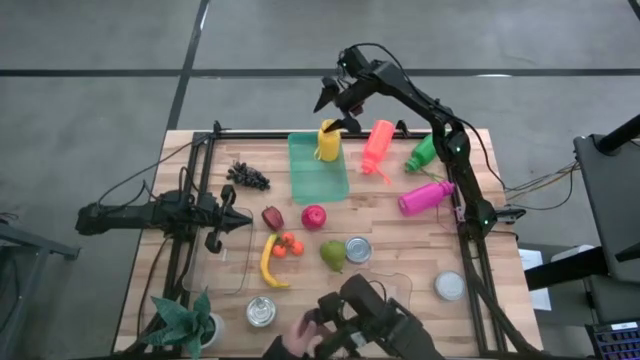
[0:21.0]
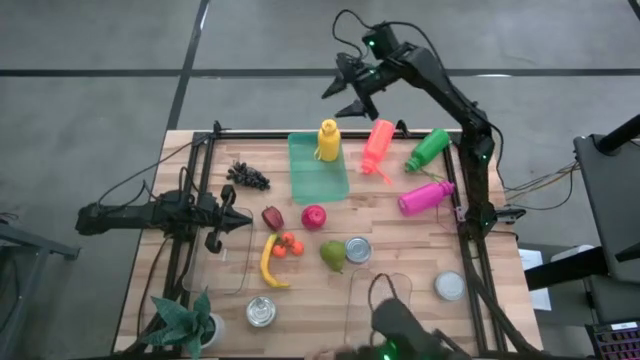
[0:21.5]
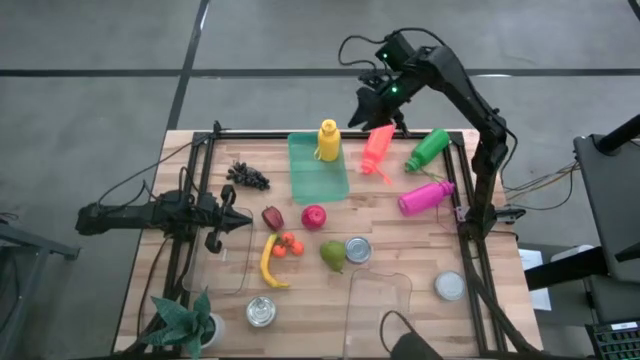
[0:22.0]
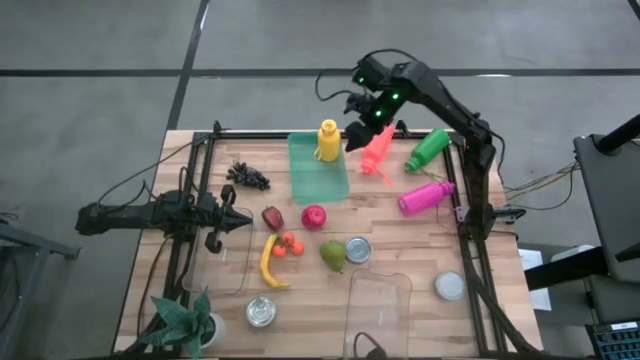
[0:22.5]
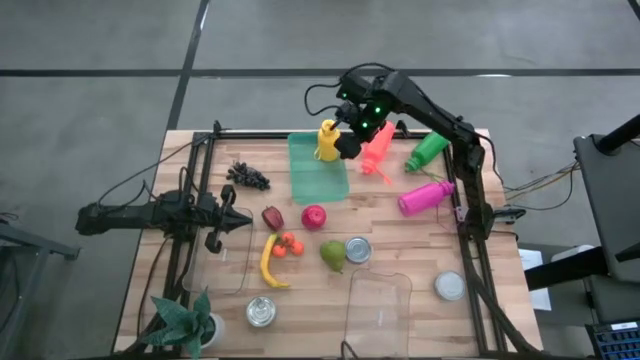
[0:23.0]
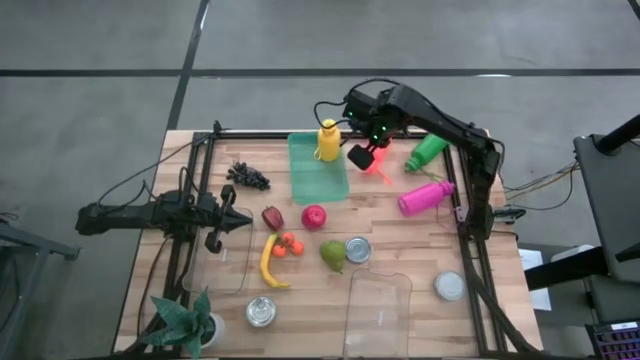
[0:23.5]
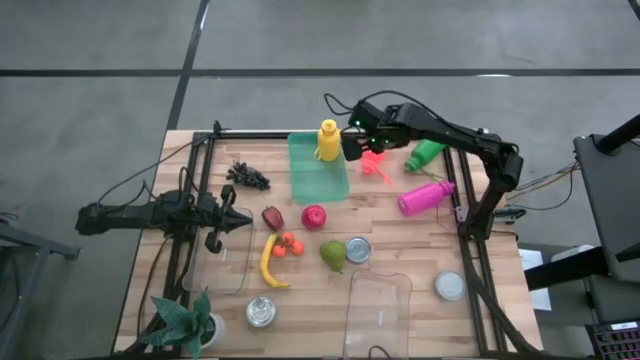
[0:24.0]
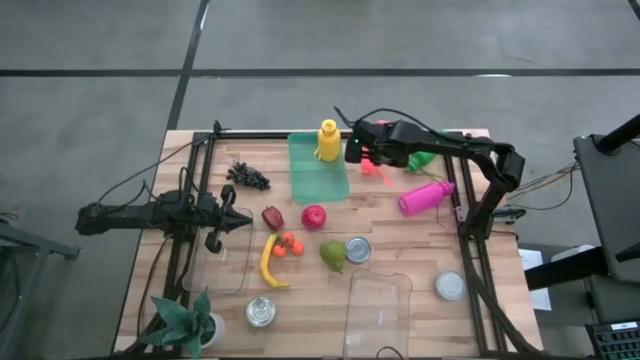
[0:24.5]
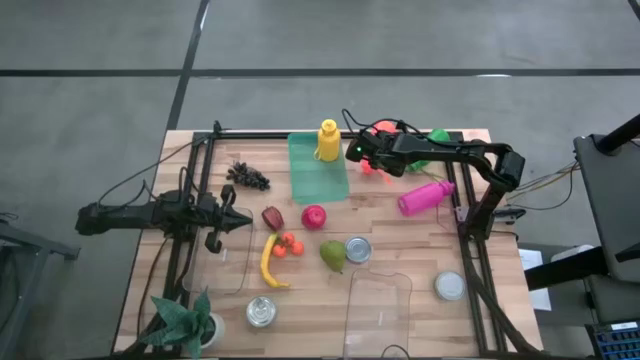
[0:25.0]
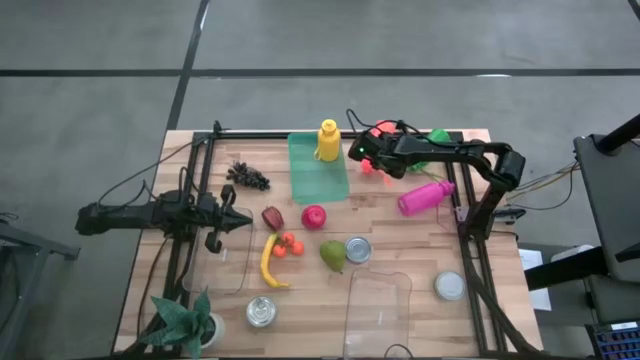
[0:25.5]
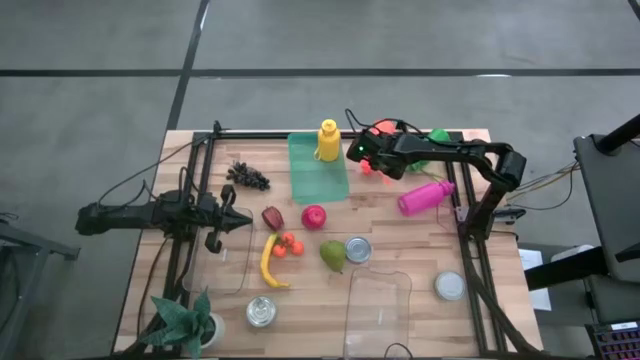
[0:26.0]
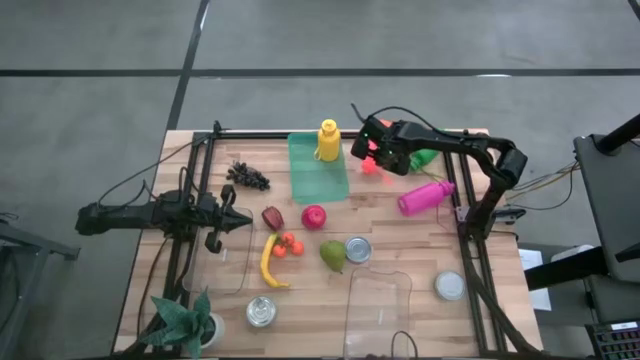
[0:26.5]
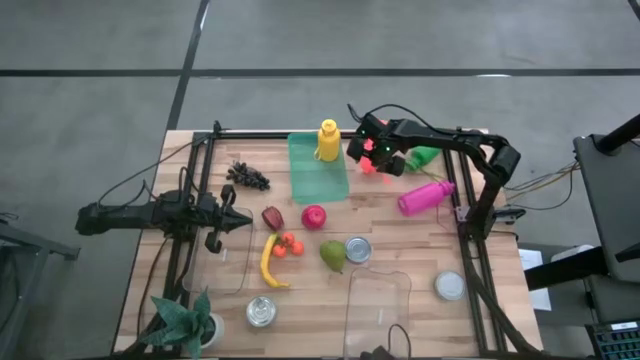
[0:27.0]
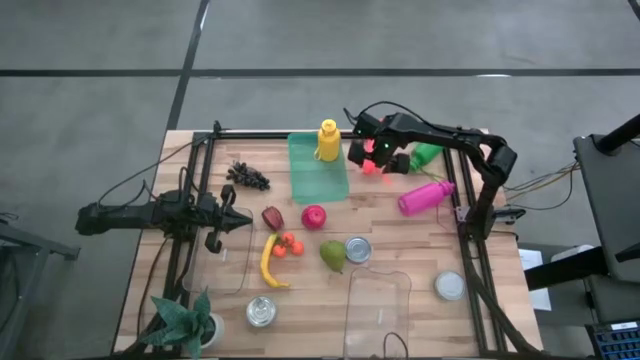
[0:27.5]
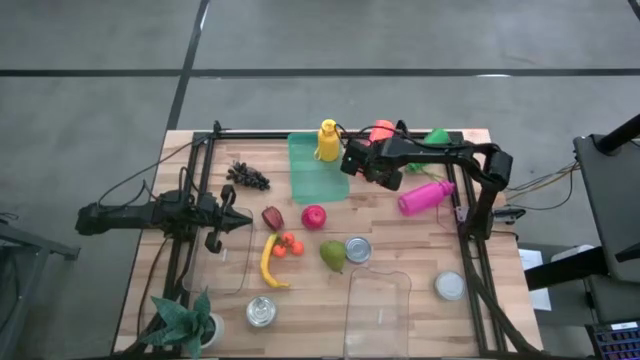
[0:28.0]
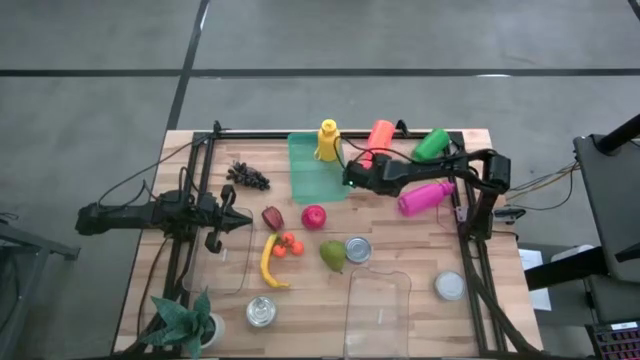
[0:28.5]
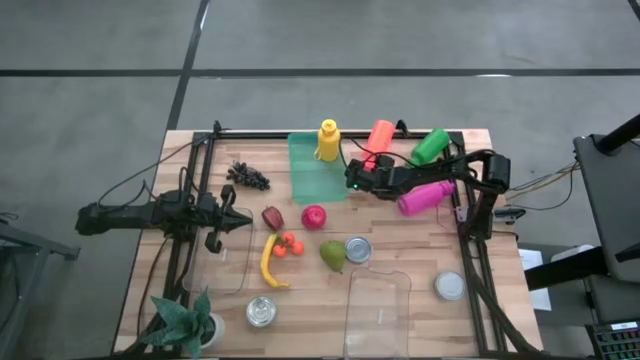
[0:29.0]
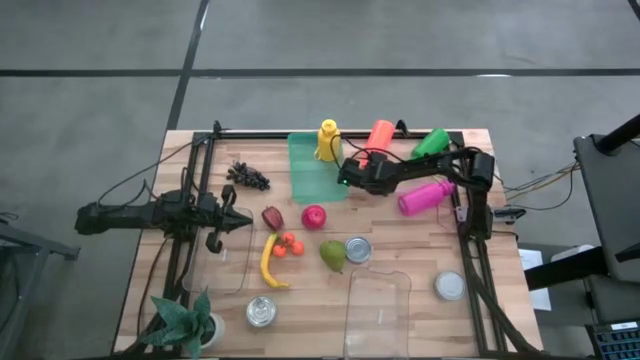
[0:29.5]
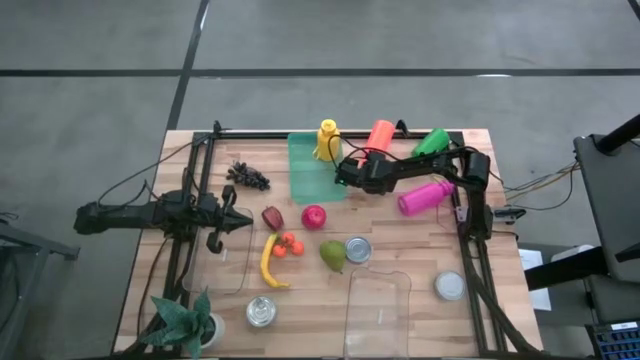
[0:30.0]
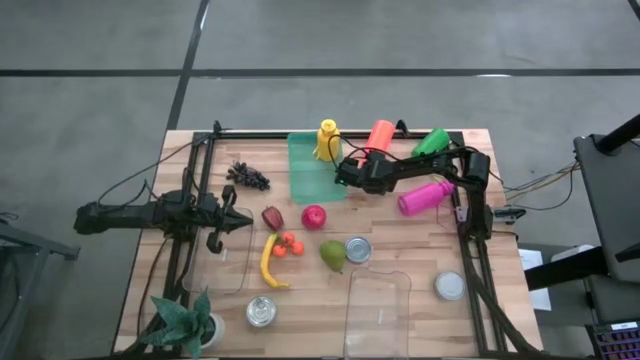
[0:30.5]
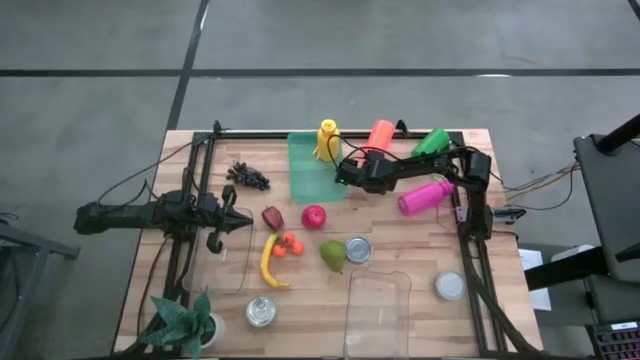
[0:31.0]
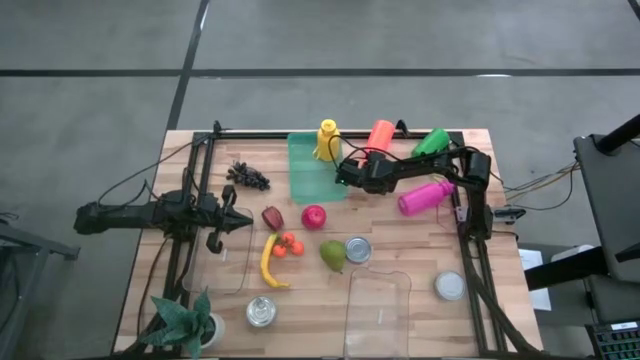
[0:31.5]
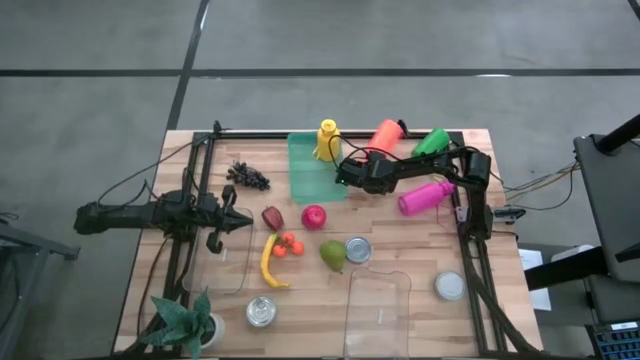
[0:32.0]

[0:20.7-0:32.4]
Task: Pick & Place Food Item
Put the orange water bottle into the green bin

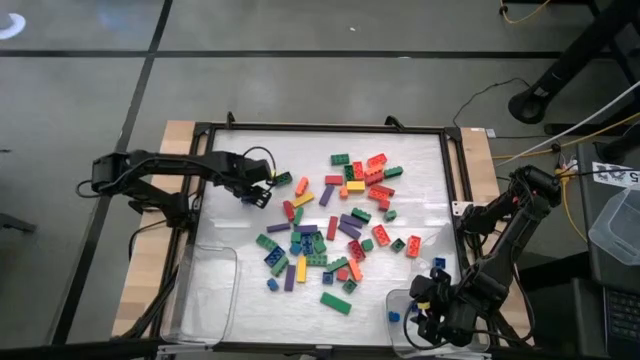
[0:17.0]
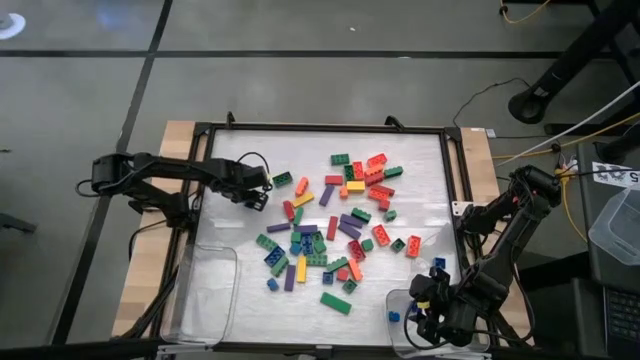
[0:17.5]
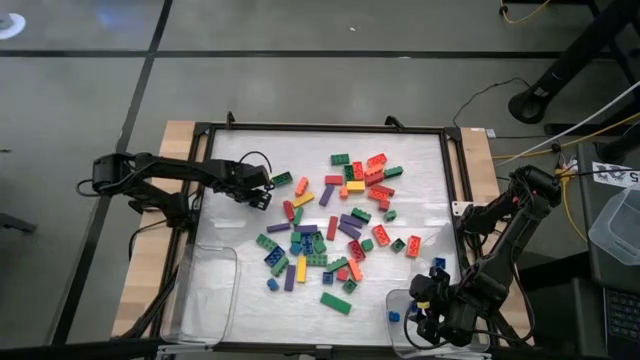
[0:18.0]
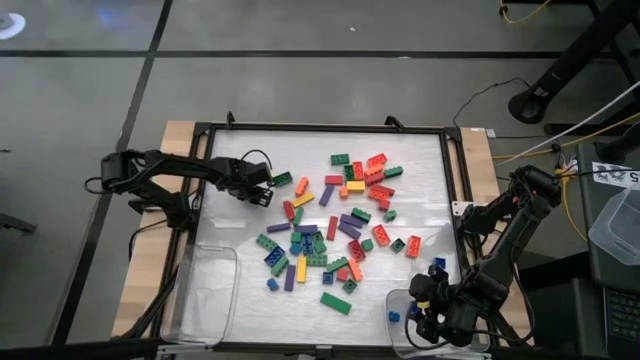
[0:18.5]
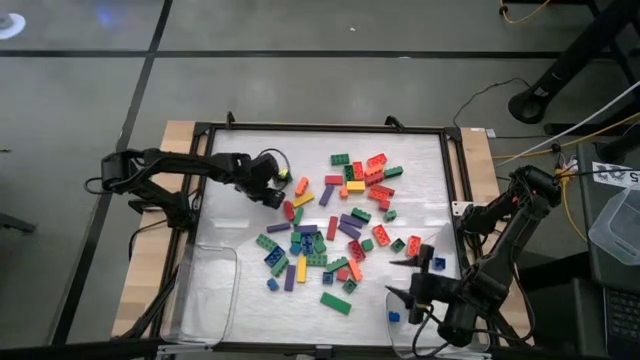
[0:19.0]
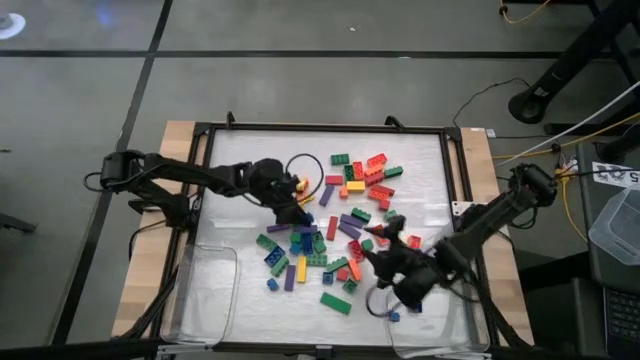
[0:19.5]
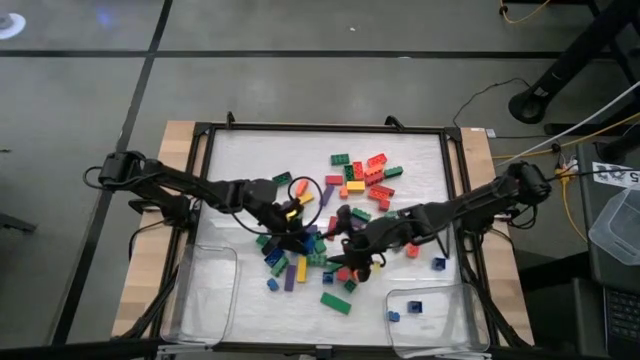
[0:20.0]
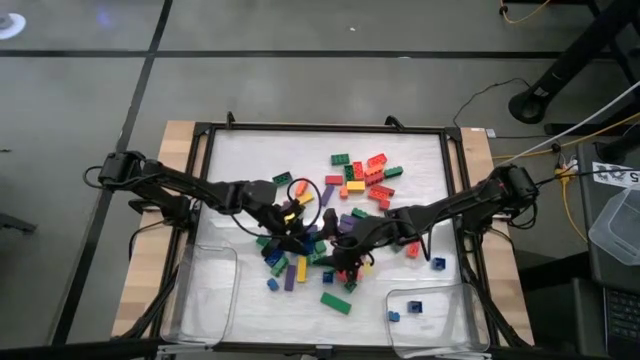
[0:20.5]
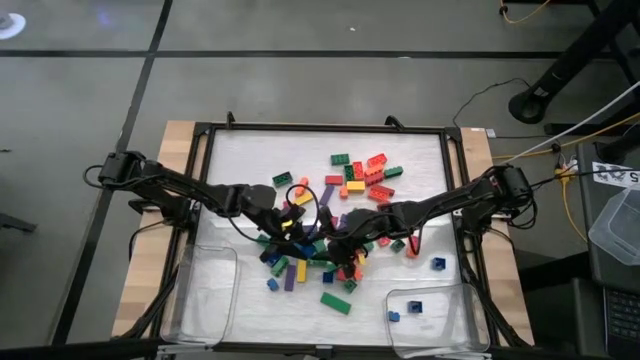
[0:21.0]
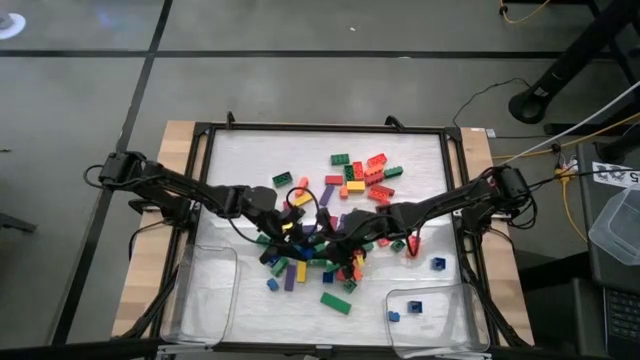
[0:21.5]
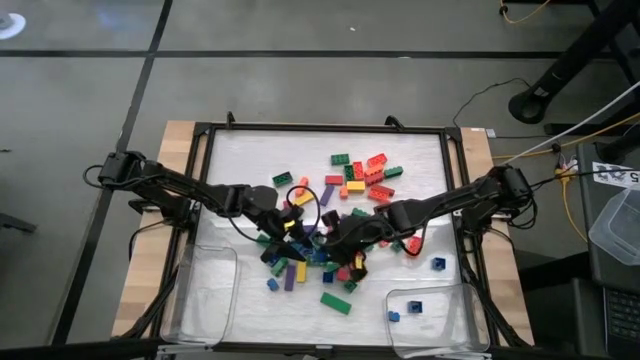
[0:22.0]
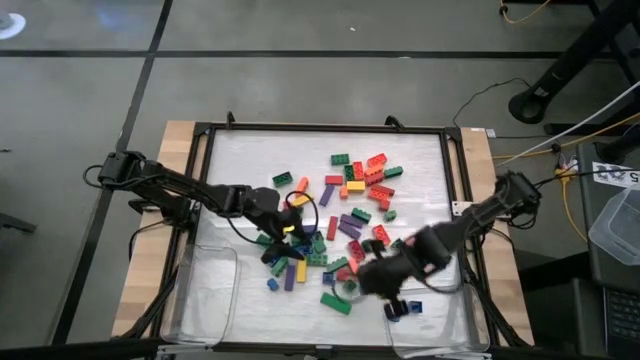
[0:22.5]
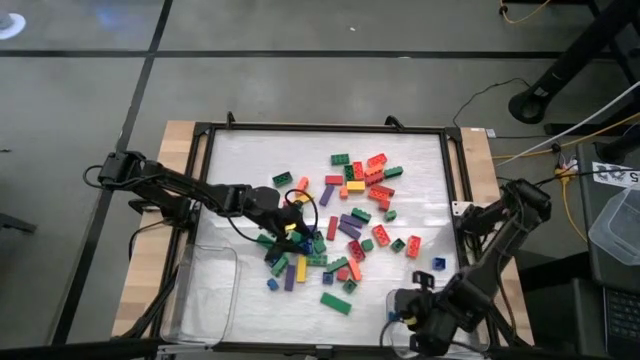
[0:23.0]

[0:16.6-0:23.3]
Task: Sort blocks by size
Put the small blue game piece into the right transparent bin

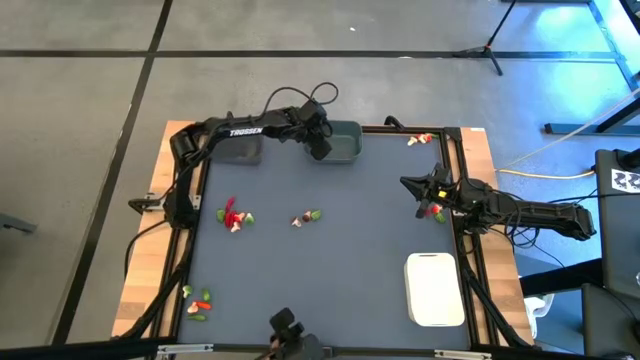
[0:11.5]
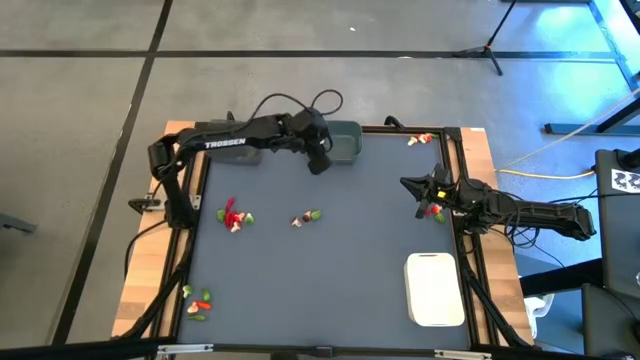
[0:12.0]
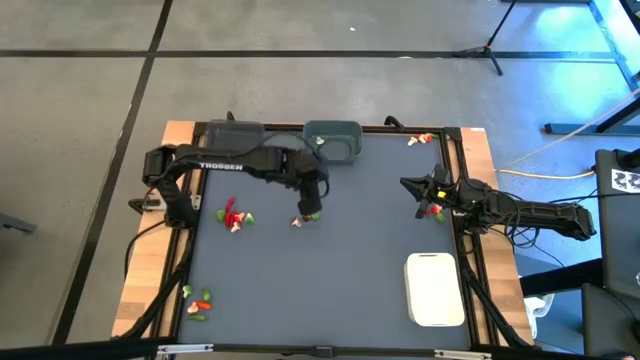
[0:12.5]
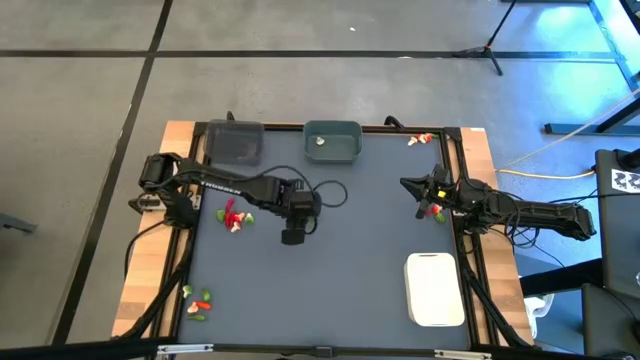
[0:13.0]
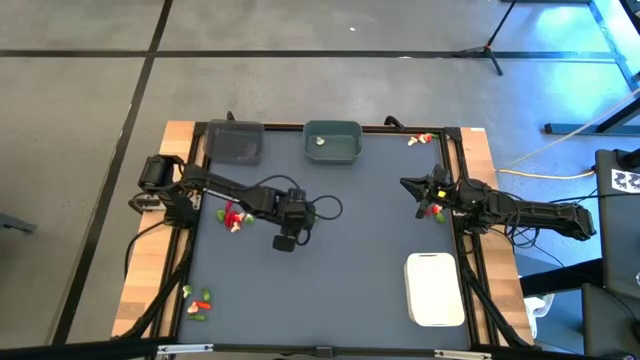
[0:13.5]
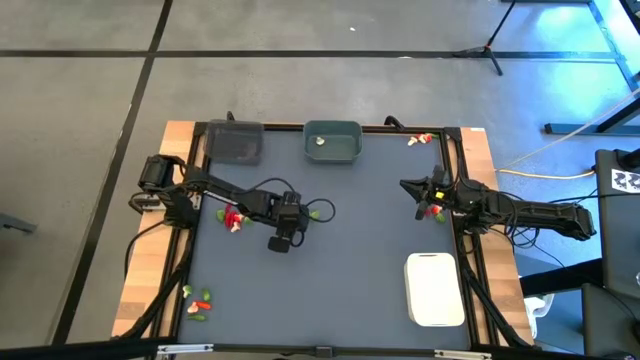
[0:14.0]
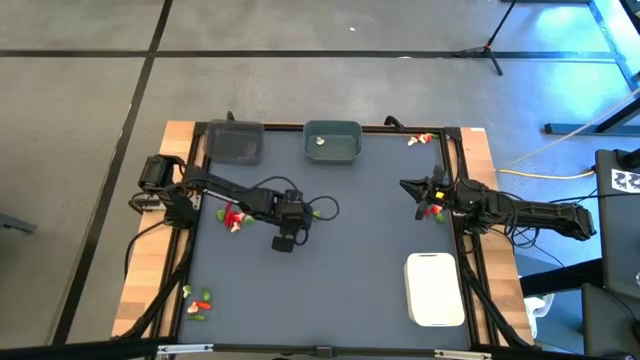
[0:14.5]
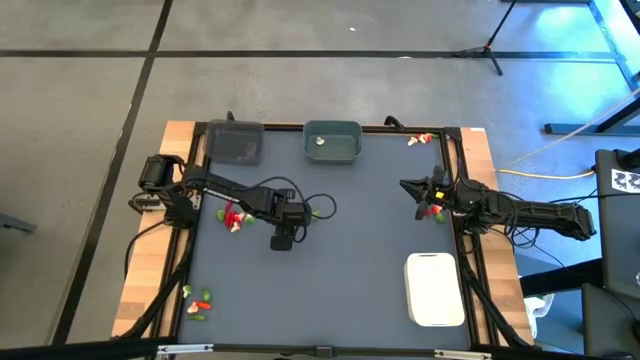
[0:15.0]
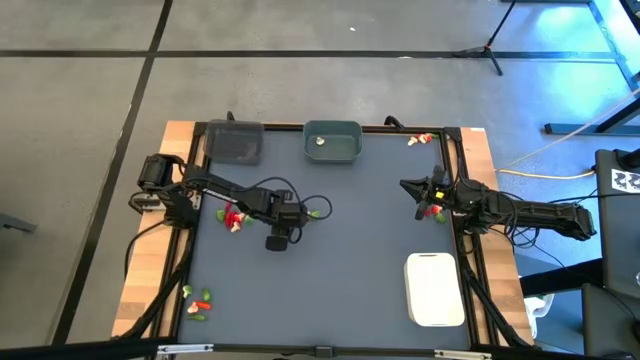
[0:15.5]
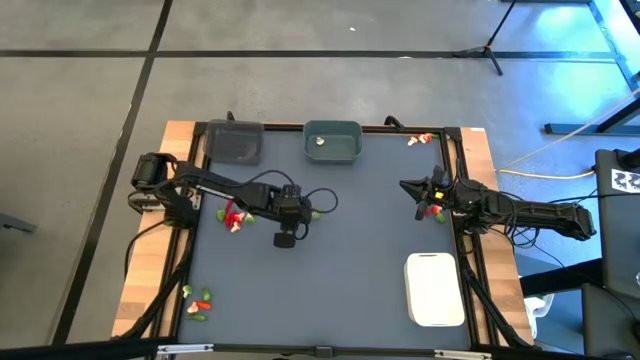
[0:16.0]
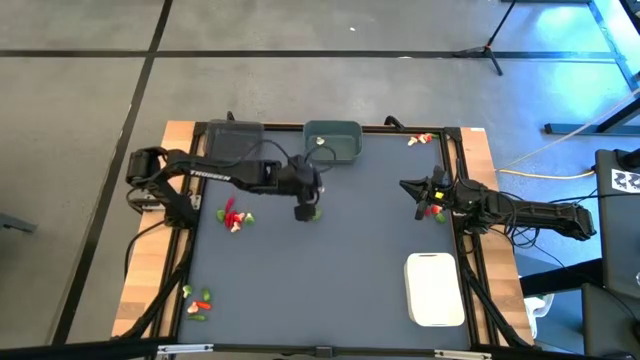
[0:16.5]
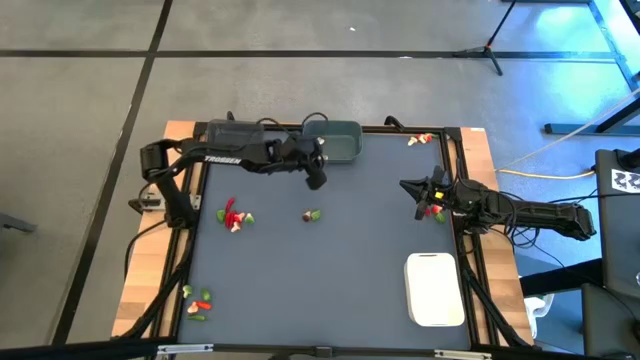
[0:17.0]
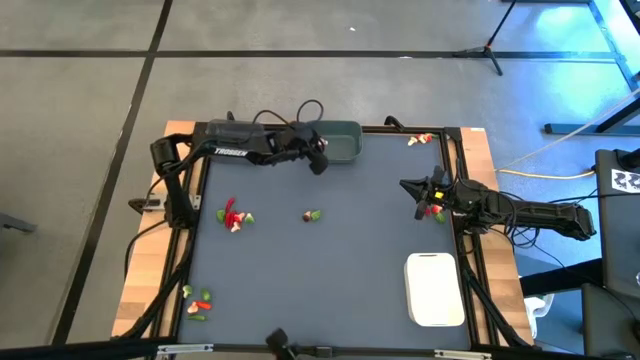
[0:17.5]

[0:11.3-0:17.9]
Task: Sort produce into baskets
Put the brown mushroom into the blue bin
